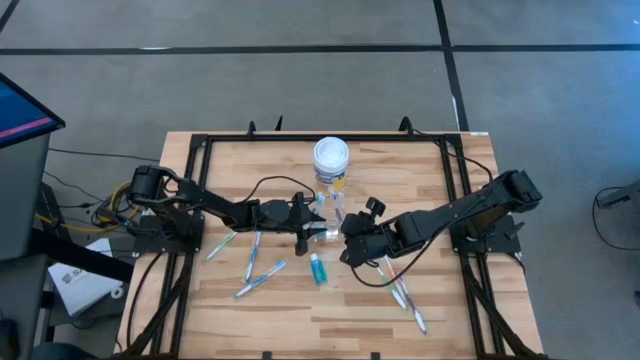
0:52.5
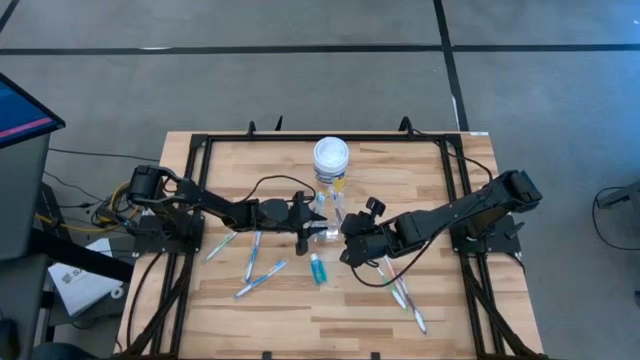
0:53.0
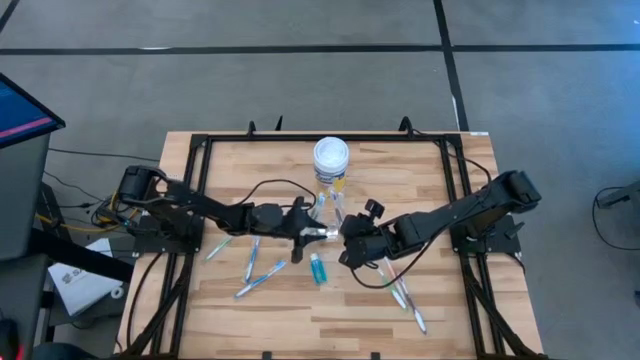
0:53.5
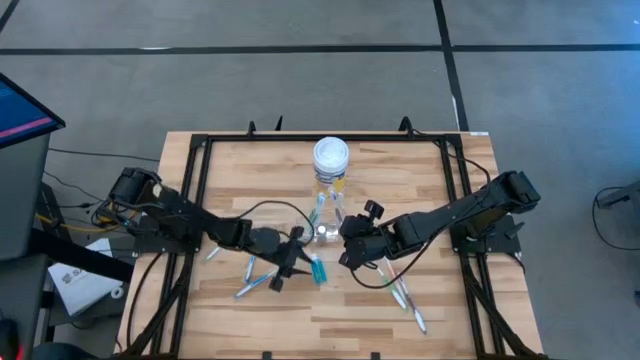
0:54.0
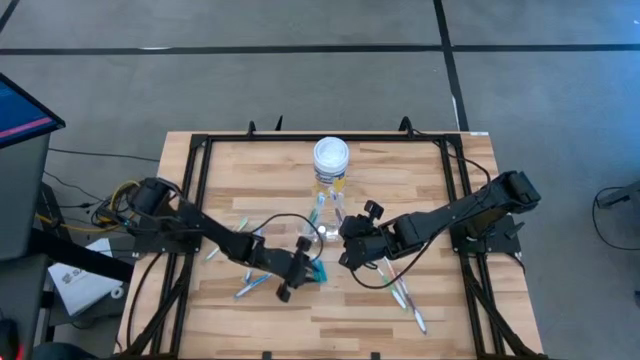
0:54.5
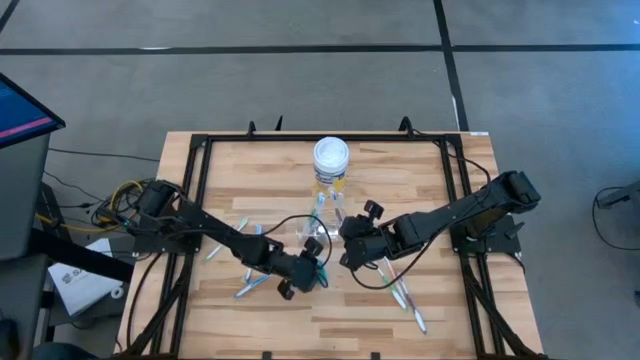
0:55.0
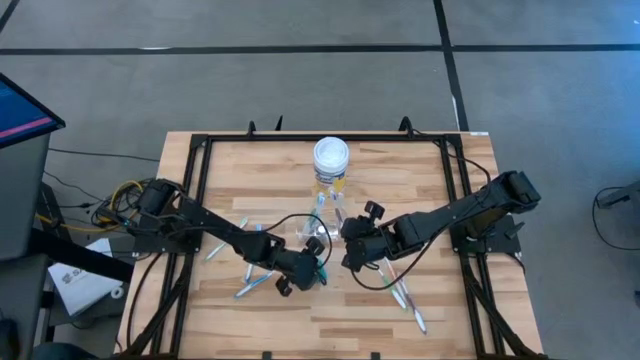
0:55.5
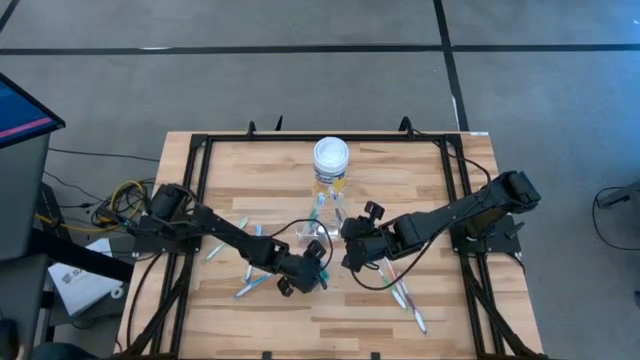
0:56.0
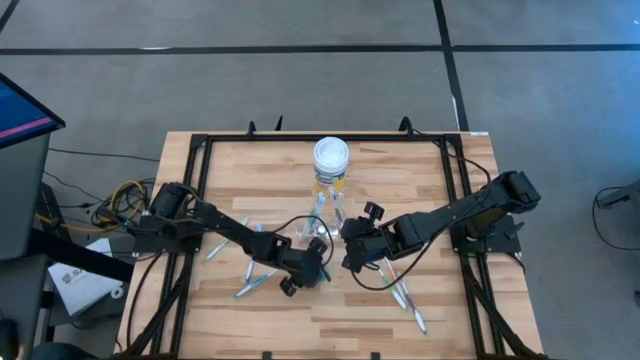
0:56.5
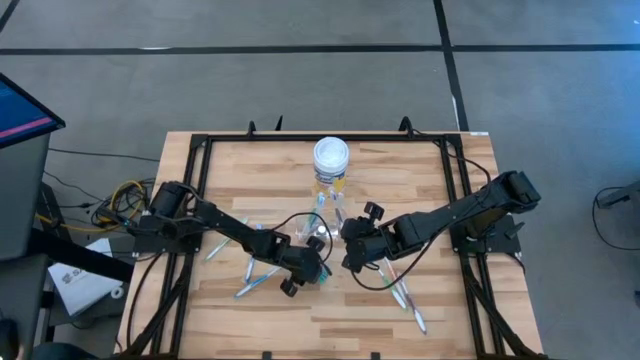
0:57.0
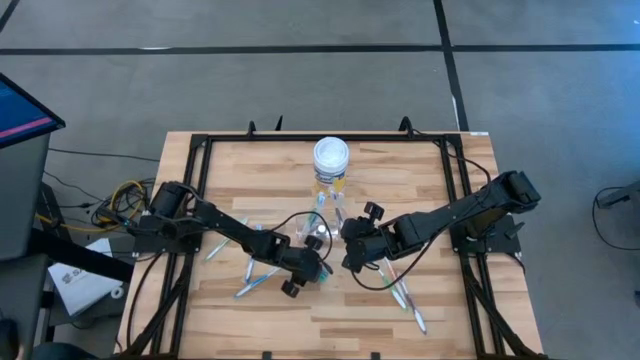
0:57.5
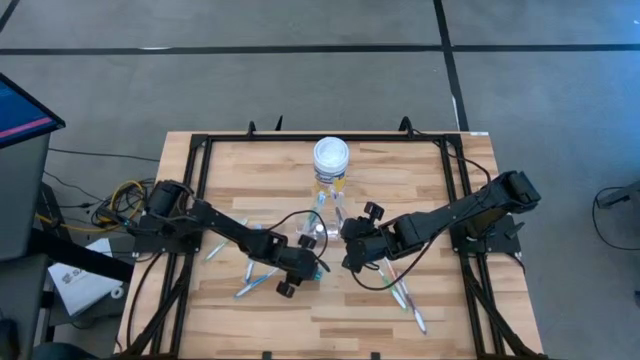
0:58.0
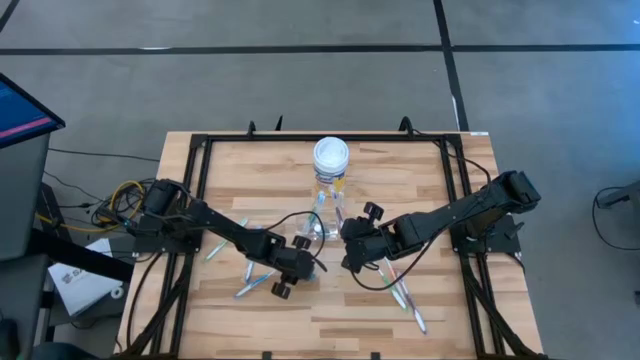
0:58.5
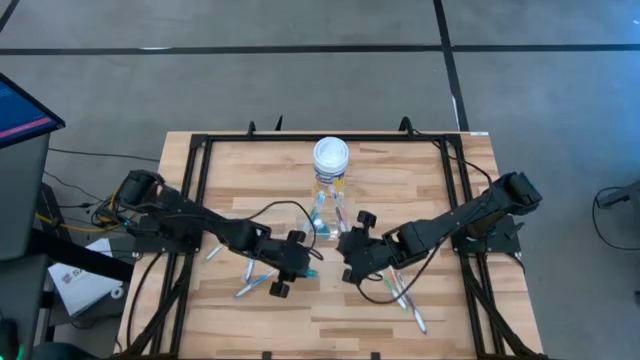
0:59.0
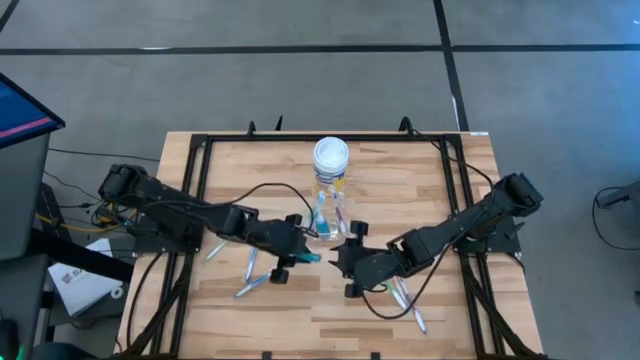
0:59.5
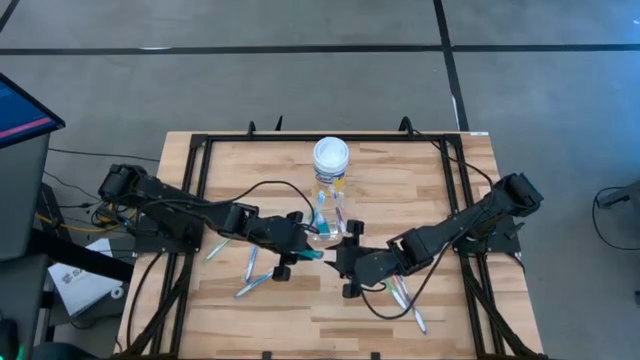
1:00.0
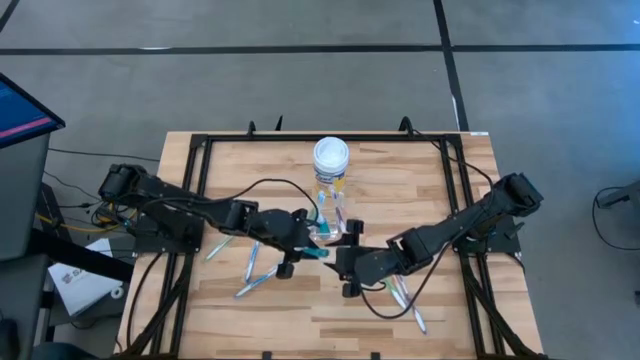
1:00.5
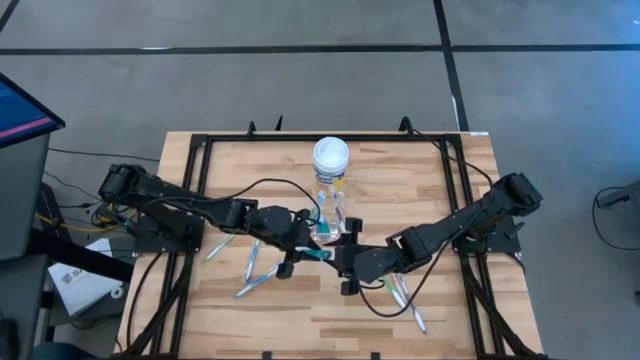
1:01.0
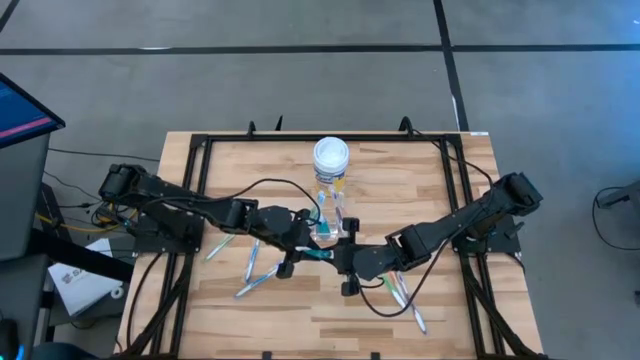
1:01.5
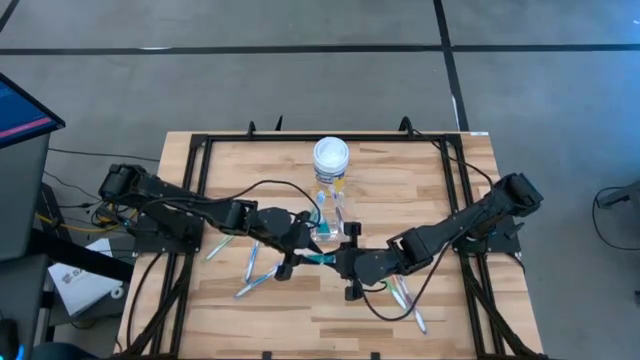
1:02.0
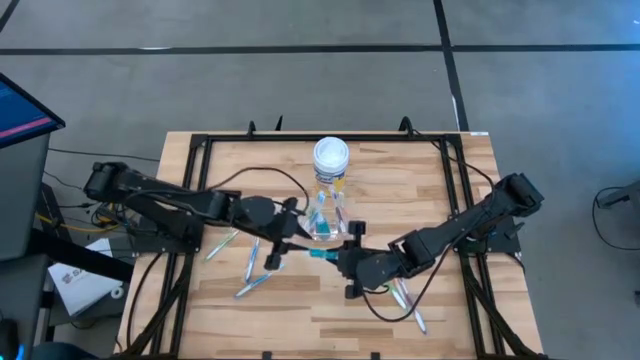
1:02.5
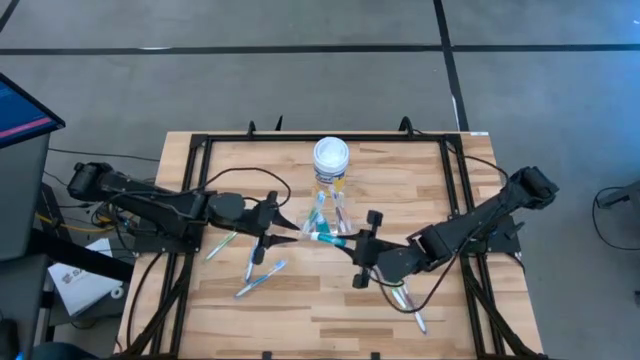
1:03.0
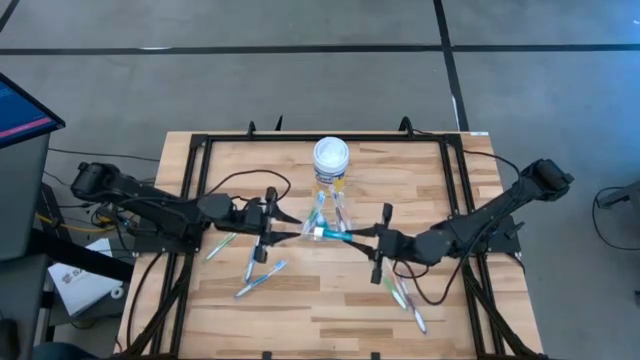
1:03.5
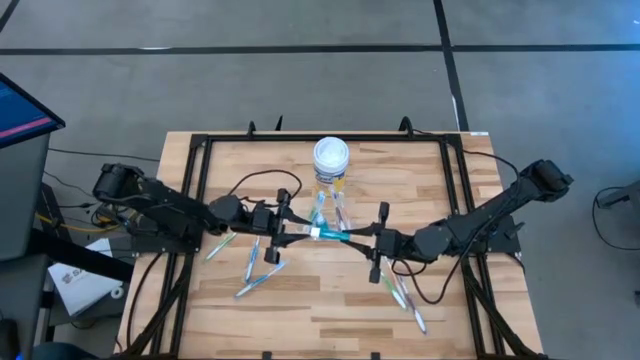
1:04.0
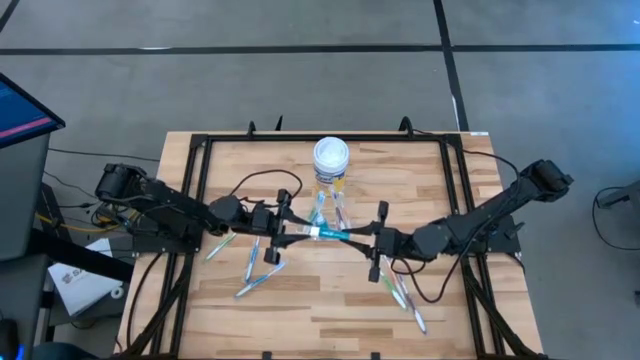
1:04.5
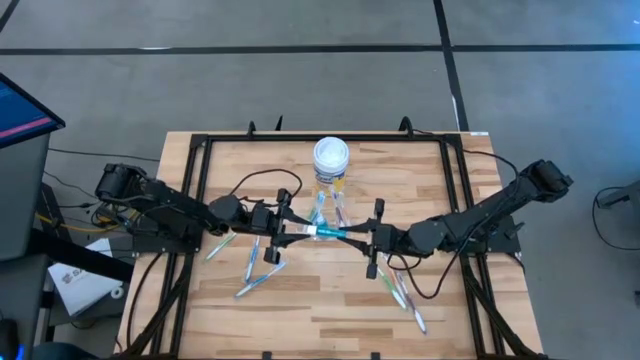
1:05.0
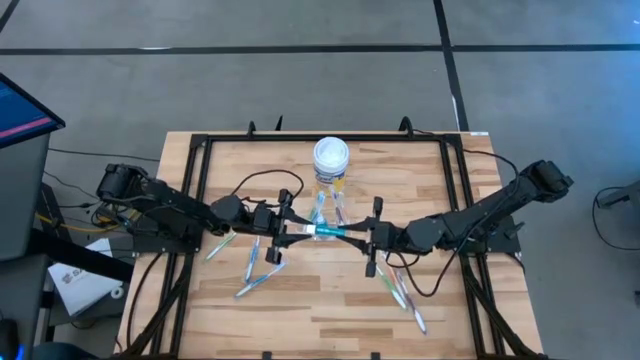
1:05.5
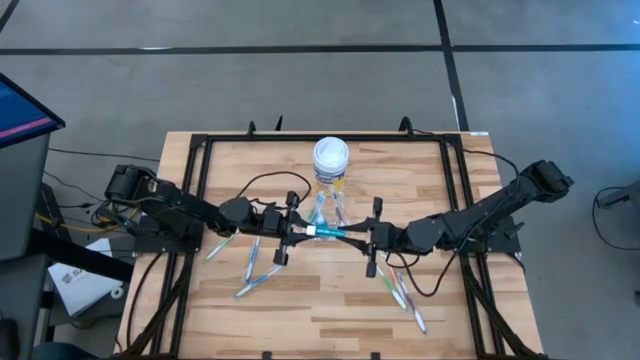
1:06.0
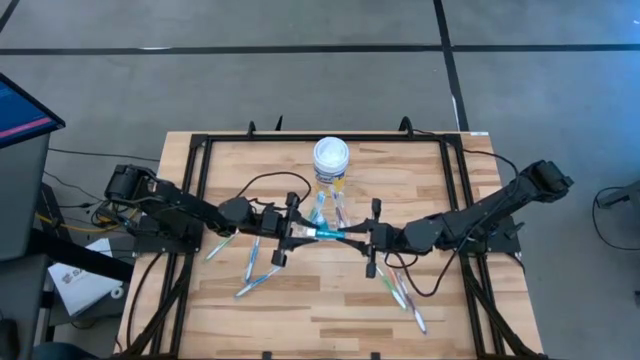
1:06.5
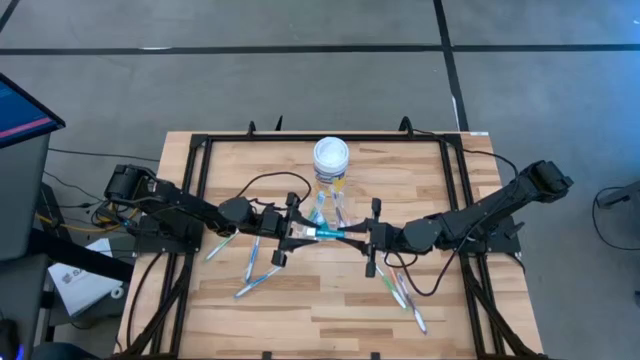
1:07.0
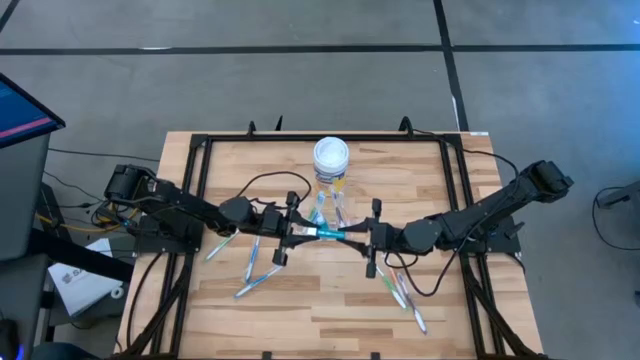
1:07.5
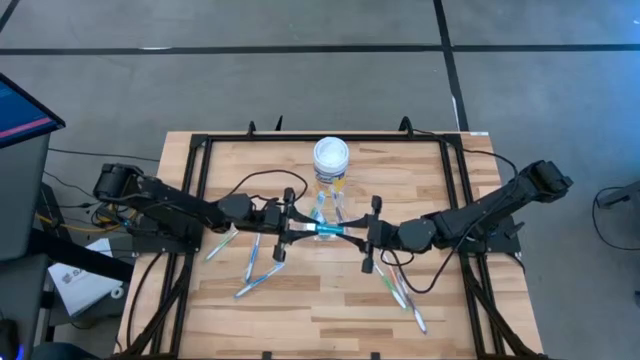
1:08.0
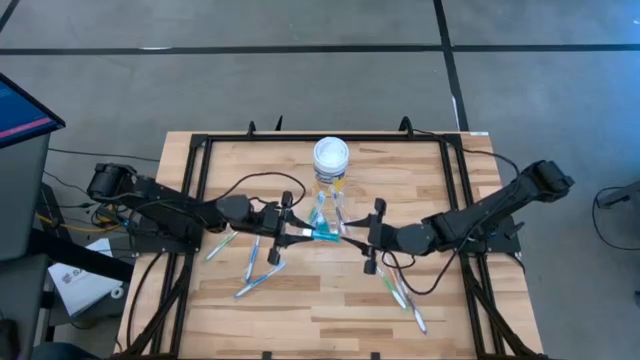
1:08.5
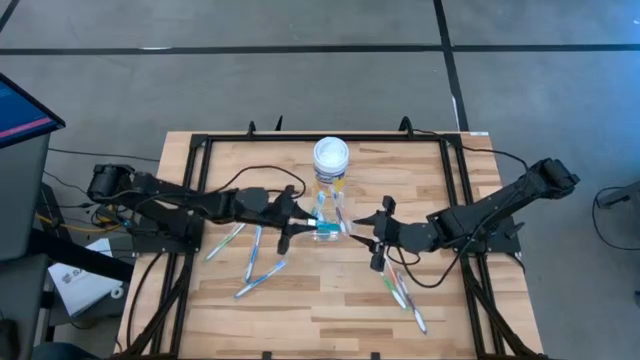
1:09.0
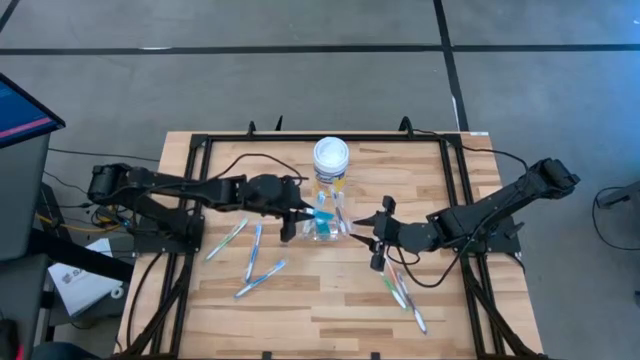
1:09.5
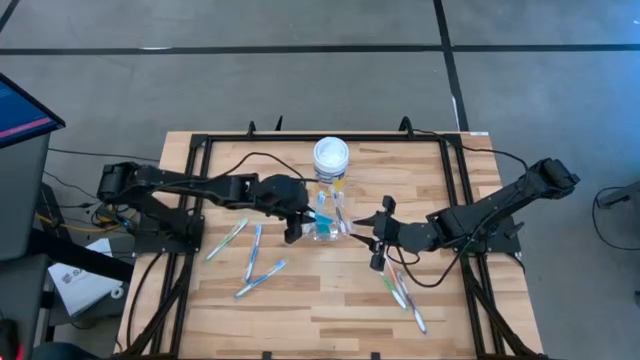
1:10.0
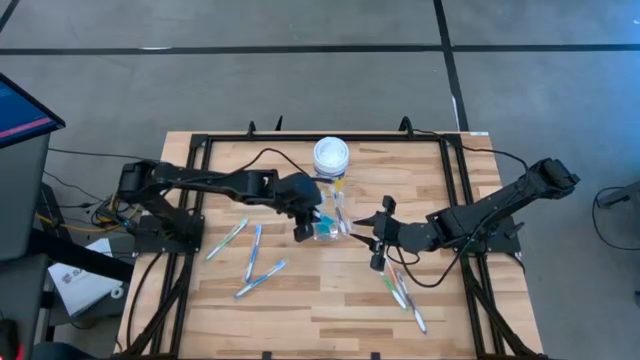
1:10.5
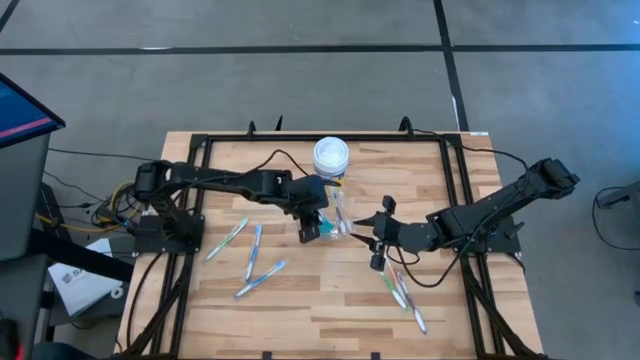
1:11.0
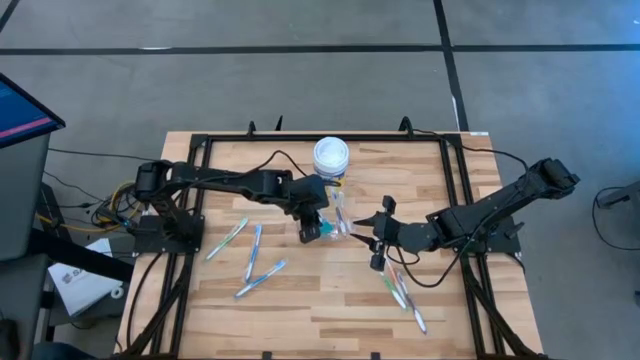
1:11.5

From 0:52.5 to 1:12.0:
Task: Pick & Place toothbrushing station
Put the blue mouthwash into the transparent organizer

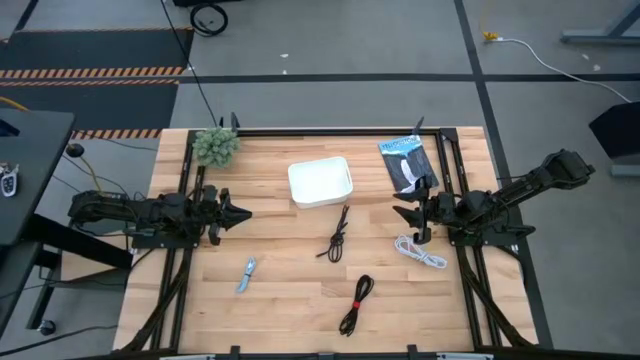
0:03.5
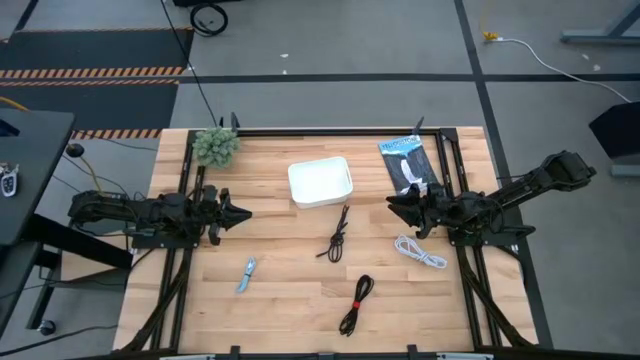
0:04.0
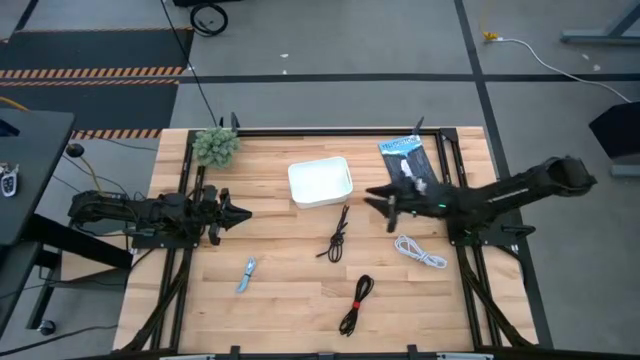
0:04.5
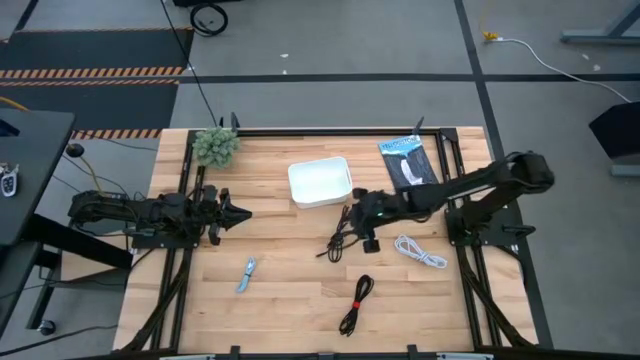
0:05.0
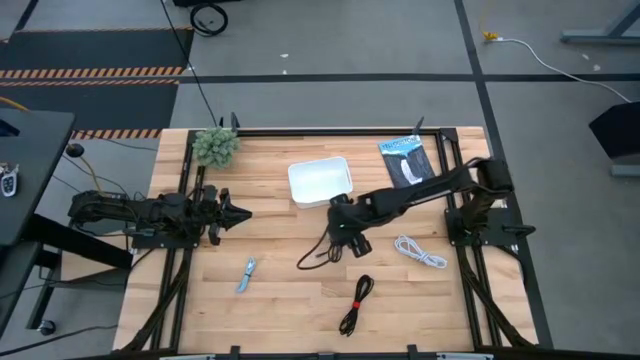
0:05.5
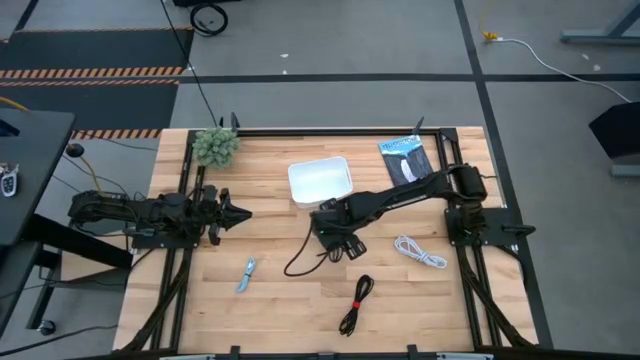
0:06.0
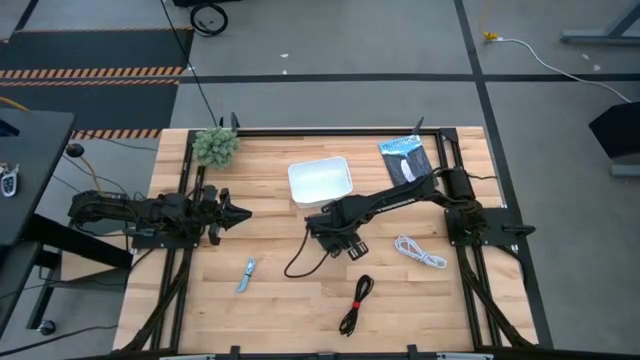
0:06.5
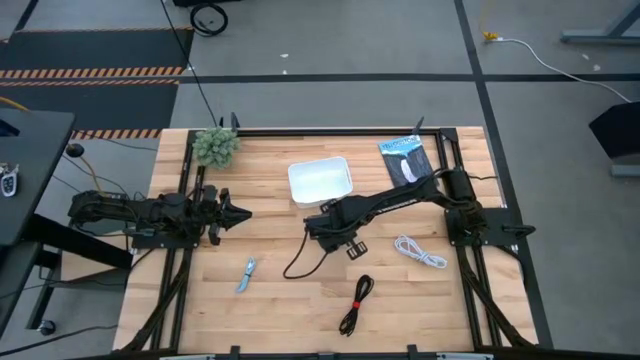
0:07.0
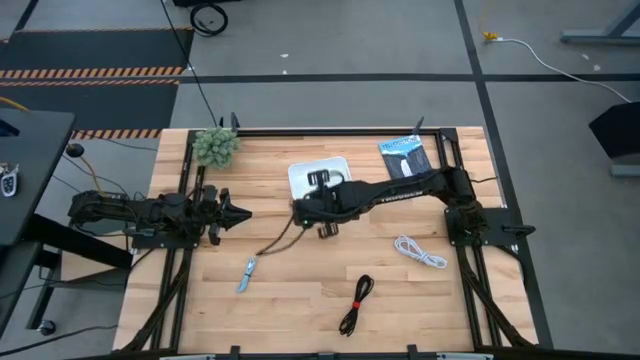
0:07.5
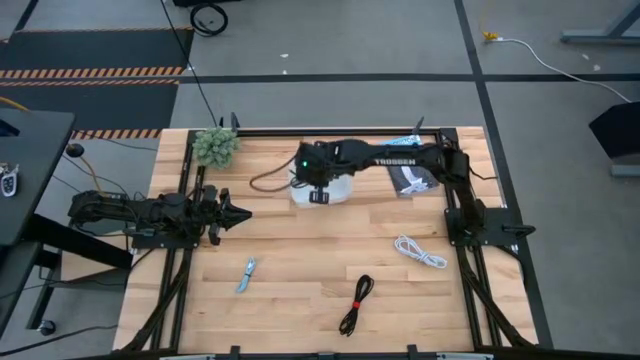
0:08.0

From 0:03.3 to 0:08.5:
Task: Pick and place USB-C Cables
Put the top black charger cable into the bin
